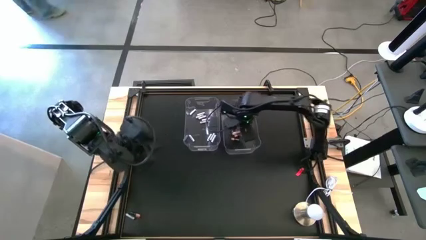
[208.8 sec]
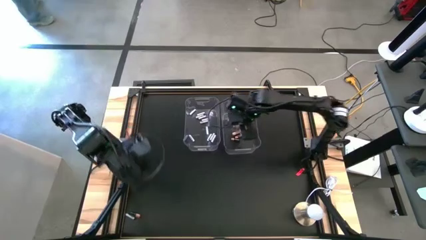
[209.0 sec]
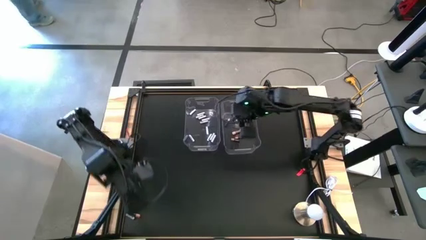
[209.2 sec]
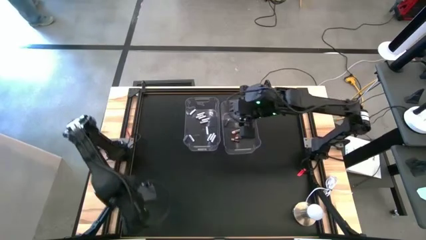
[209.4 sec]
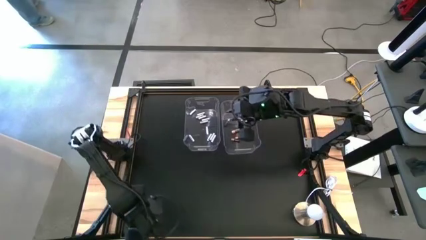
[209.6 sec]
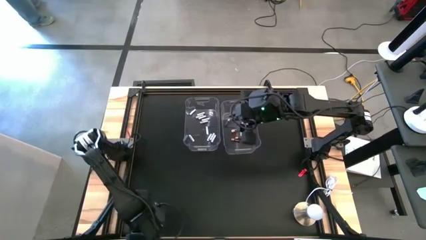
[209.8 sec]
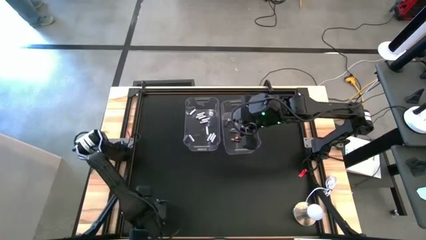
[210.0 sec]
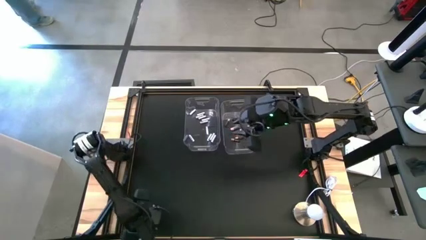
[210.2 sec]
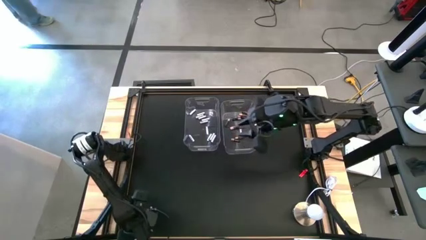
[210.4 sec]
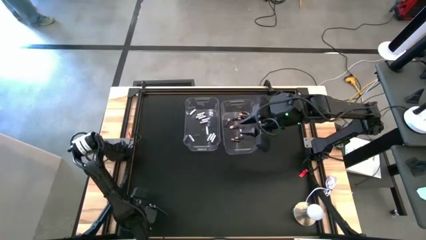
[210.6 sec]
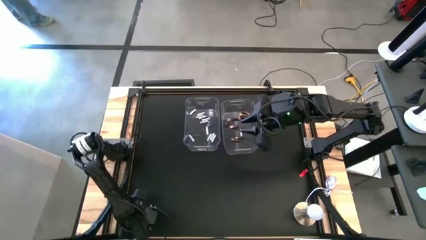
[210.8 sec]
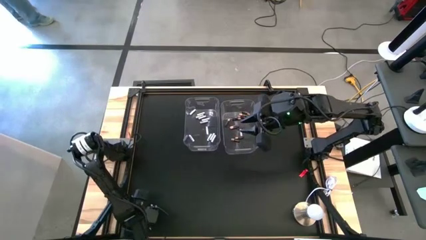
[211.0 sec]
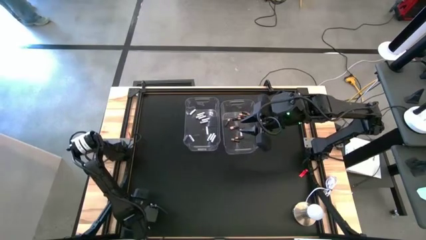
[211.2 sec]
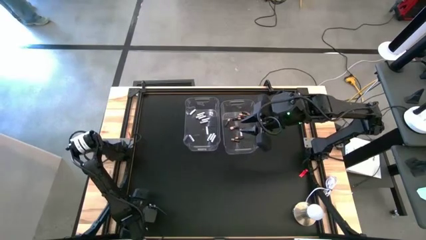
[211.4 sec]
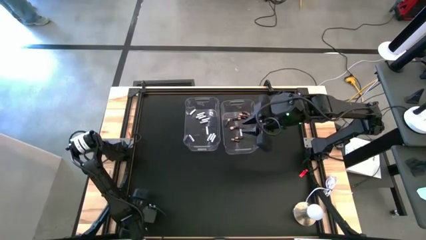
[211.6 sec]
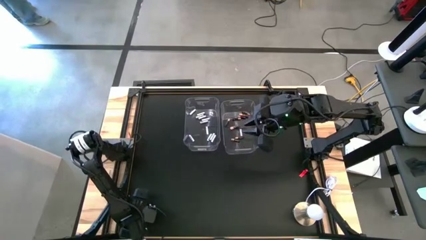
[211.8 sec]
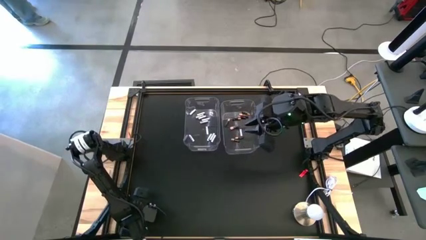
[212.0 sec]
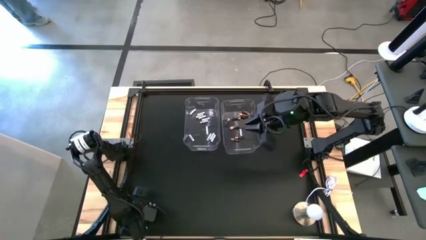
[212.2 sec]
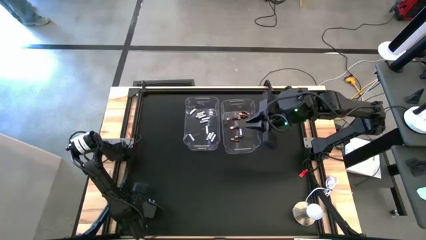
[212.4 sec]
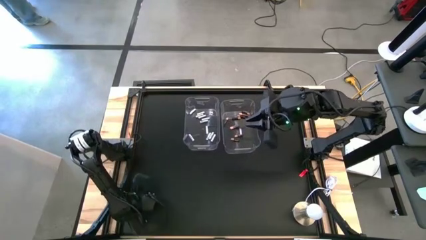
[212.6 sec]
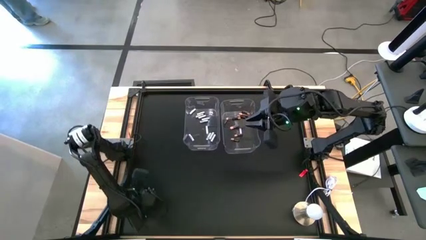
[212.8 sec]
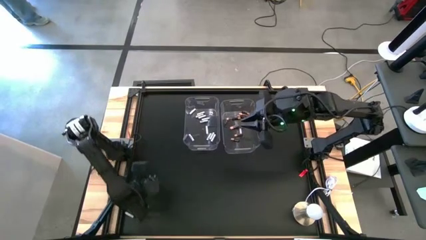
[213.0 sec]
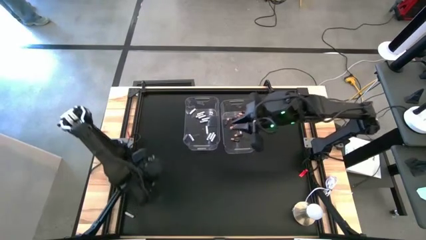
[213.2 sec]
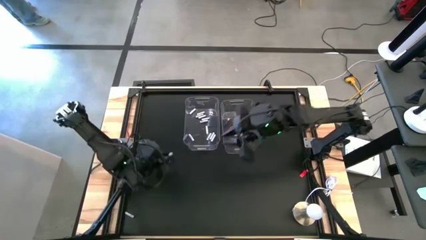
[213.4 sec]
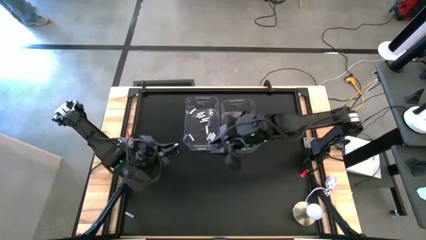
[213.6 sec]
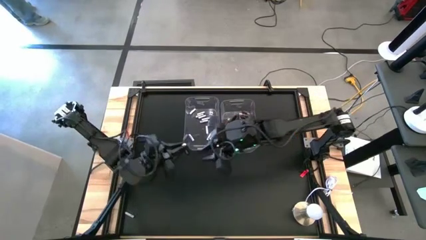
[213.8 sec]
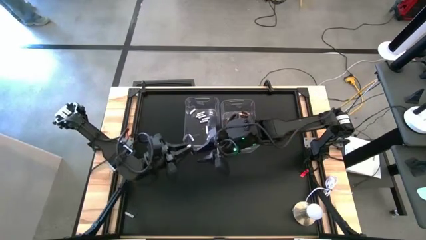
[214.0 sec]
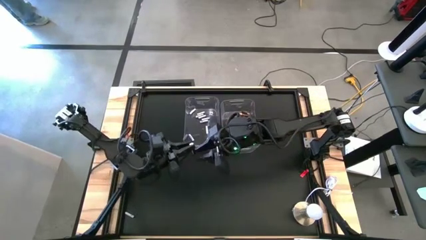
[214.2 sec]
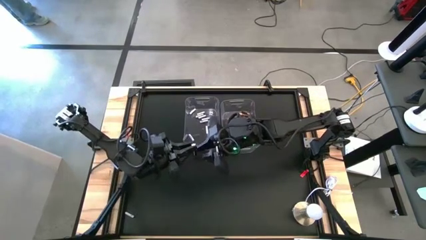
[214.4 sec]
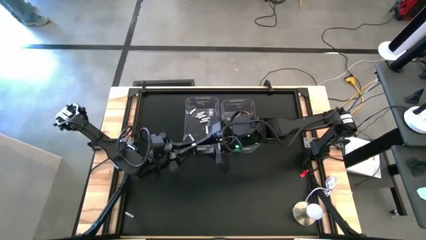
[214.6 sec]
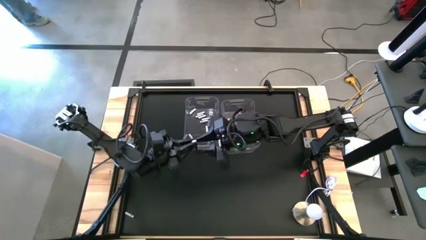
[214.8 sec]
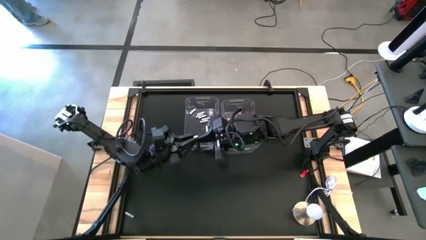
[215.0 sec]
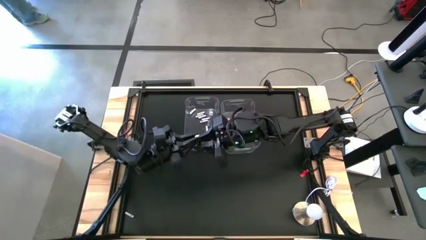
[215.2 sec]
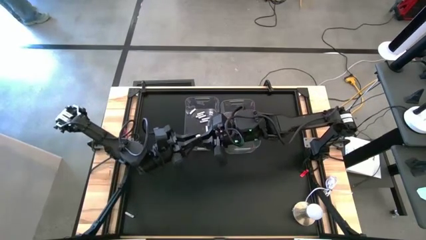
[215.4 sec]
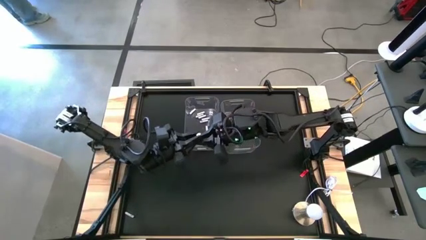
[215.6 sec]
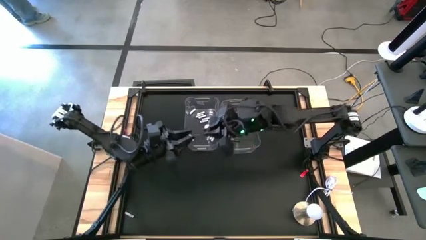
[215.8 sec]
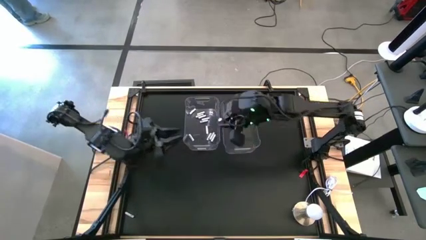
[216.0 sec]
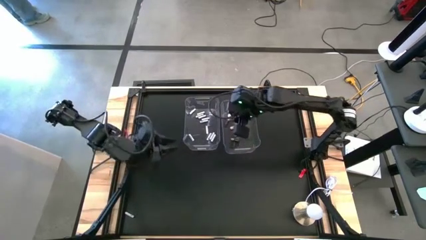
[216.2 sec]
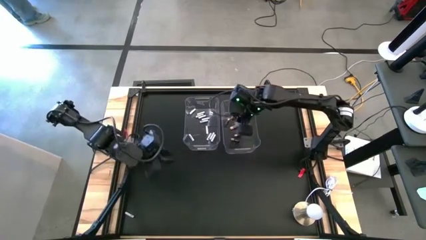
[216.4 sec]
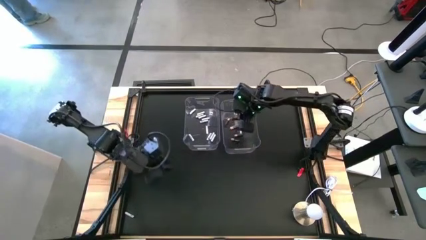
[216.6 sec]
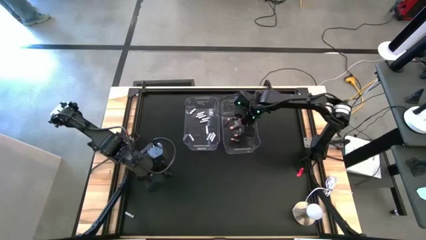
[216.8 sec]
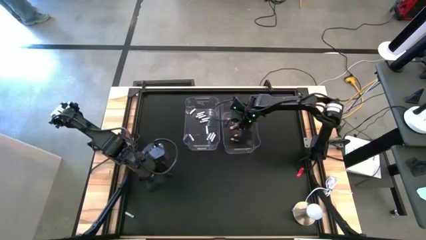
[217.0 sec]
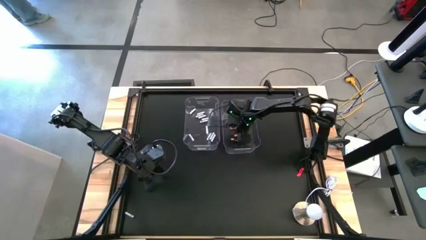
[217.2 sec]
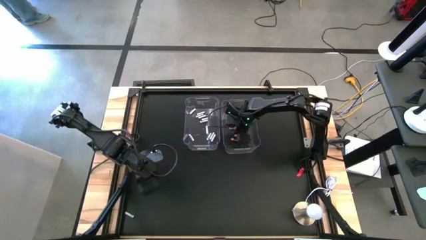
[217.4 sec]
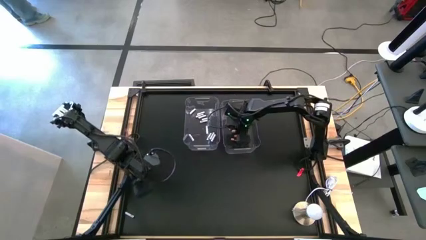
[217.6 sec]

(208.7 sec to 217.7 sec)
Task: Sort batteries
Put the black battery into the right transparent bin

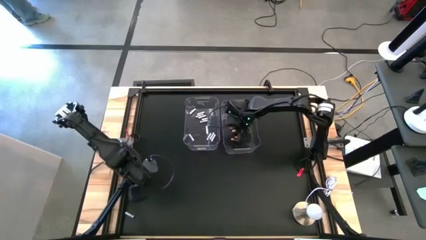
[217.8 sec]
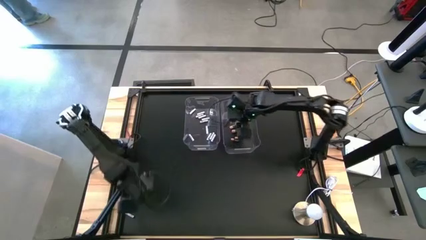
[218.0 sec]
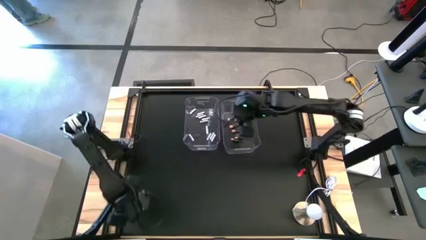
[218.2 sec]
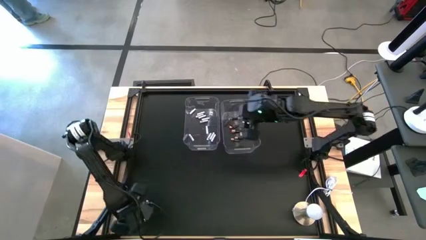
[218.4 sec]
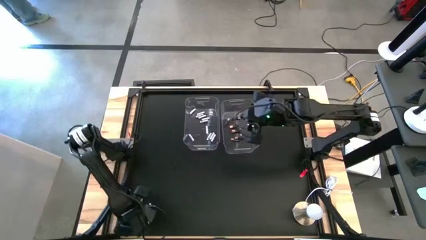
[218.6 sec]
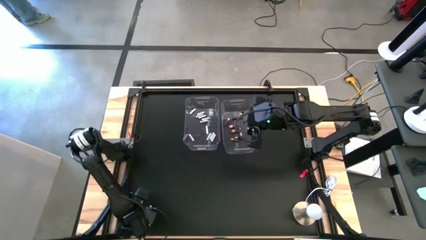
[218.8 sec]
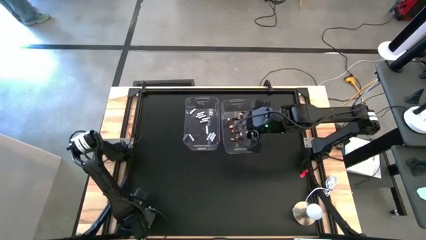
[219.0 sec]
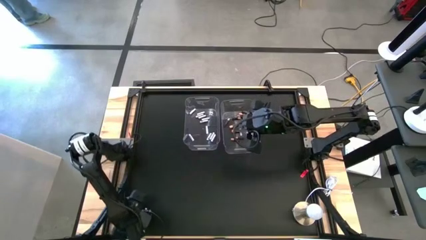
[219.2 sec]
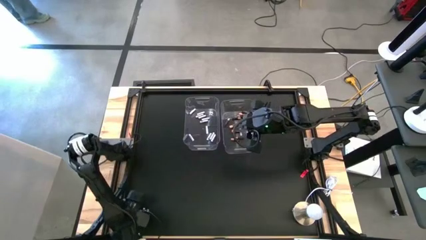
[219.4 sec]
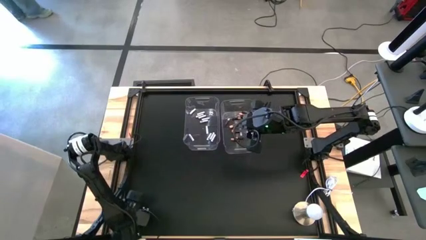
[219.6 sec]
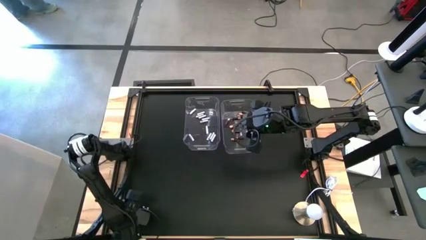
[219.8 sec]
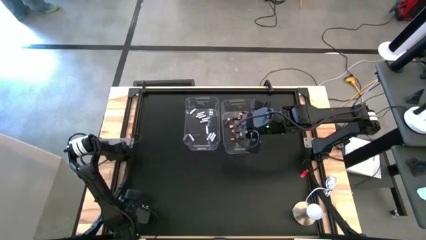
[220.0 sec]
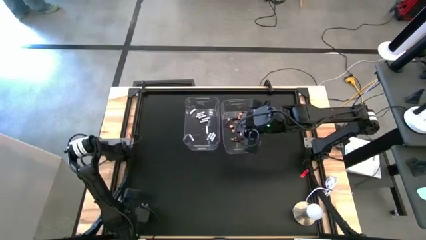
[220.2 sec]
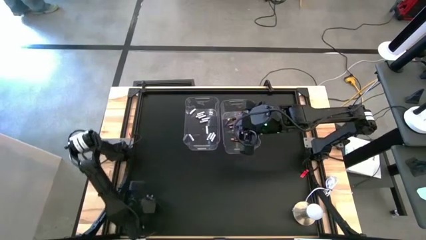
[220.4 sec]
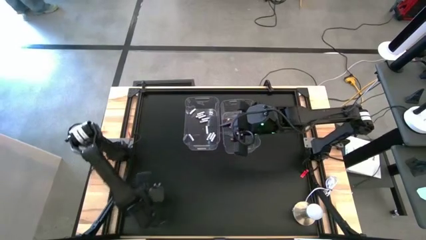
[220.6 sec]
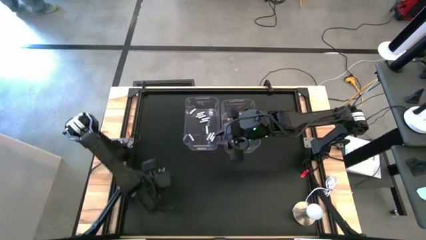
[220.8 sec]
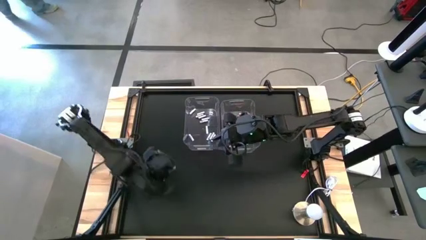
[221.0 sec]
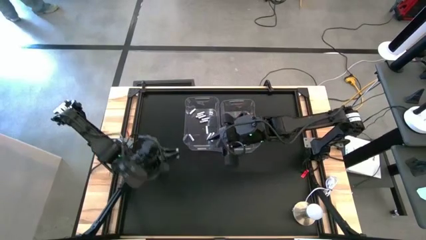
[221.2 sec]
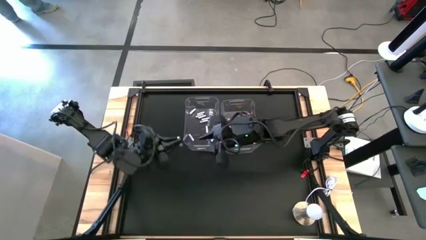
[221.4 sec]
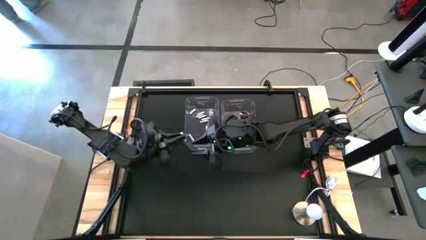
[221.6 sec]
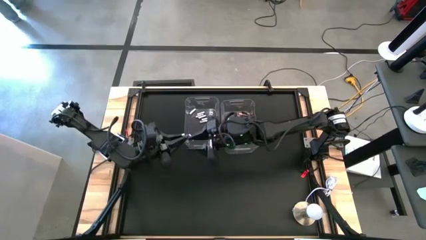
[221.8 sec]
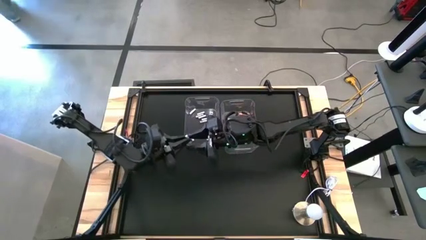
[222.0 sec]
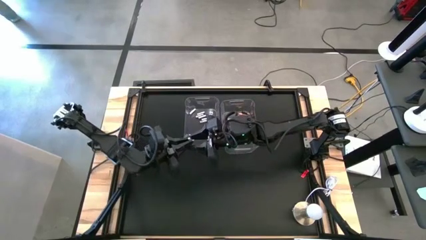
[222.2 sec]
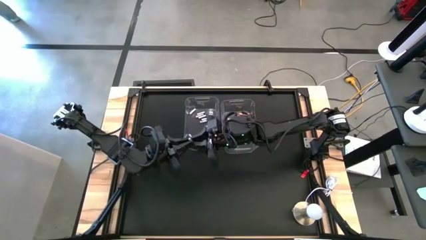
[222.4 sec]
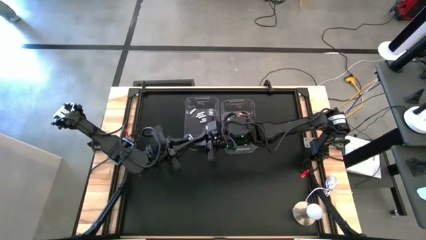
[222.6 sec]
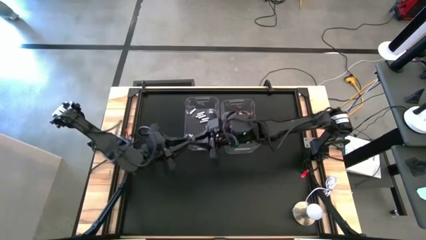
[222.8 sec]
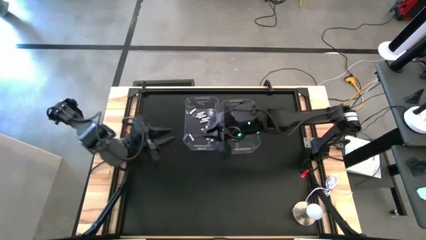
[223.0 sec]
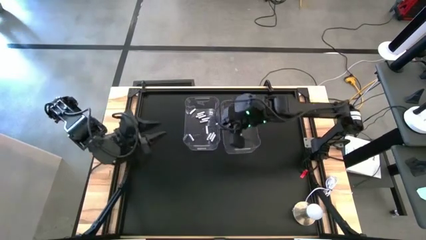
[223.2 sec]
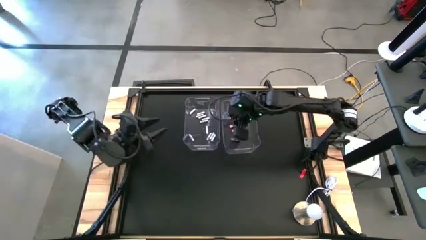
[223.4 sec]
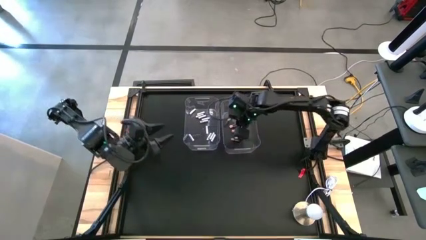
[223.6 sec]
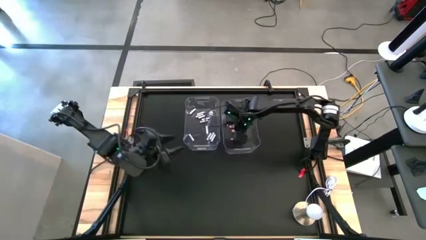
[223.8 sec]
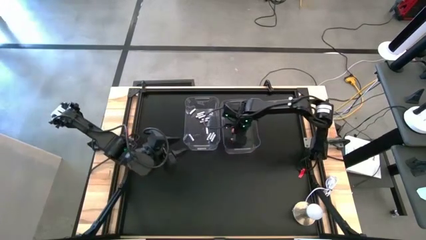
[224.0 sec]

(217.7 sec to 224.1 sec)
Put the white battery into the left transparent bin
